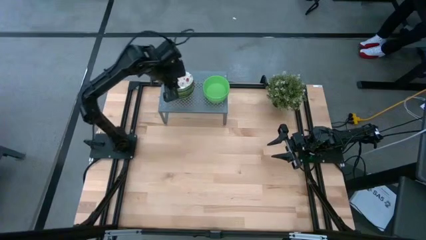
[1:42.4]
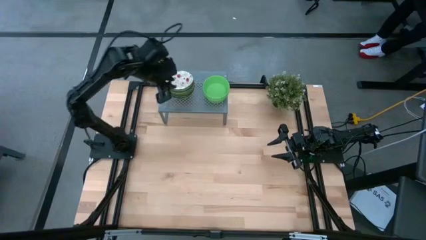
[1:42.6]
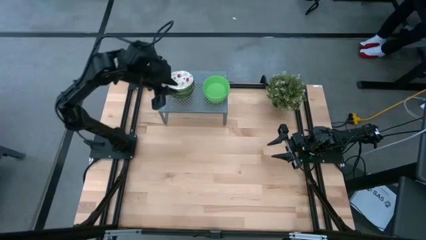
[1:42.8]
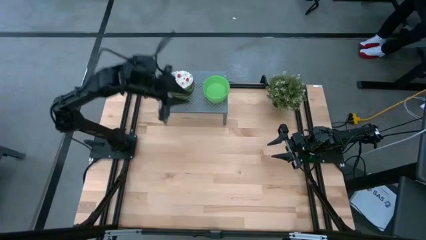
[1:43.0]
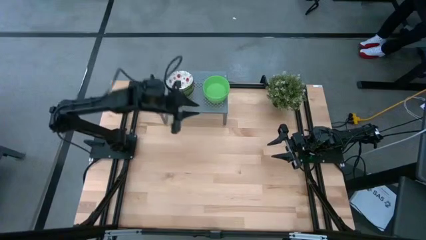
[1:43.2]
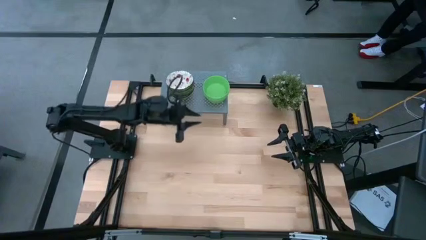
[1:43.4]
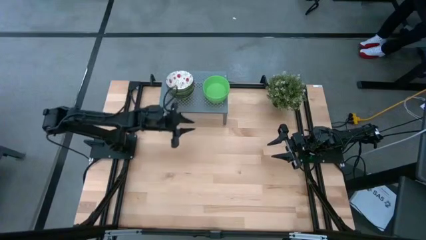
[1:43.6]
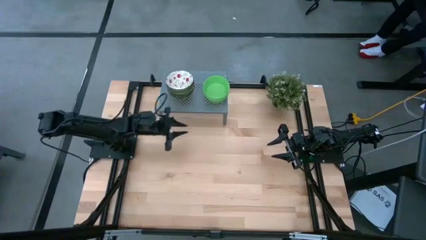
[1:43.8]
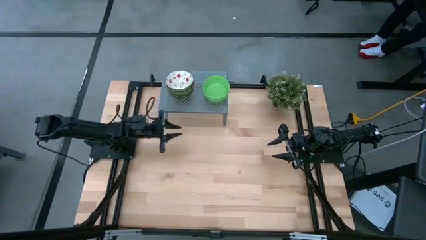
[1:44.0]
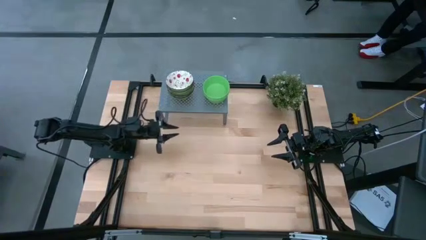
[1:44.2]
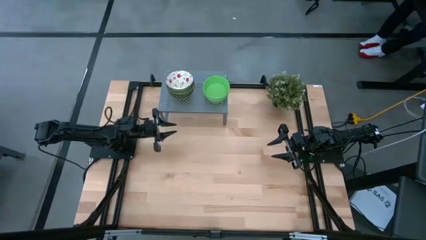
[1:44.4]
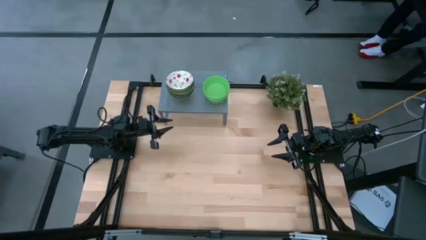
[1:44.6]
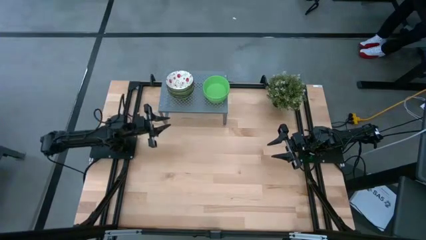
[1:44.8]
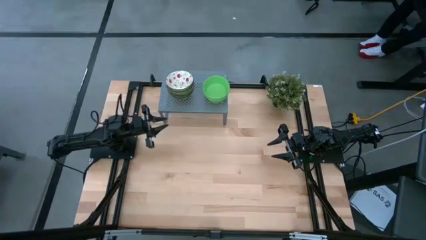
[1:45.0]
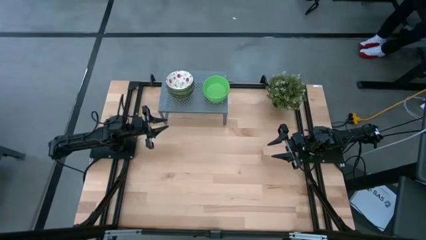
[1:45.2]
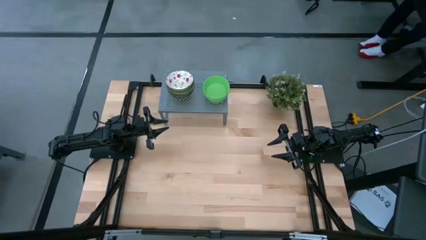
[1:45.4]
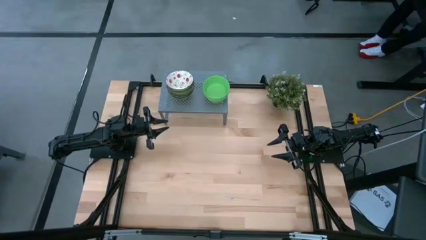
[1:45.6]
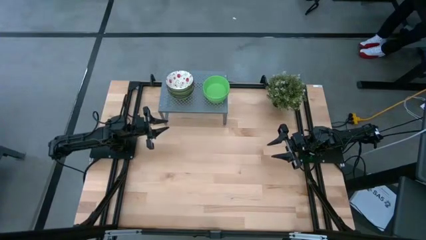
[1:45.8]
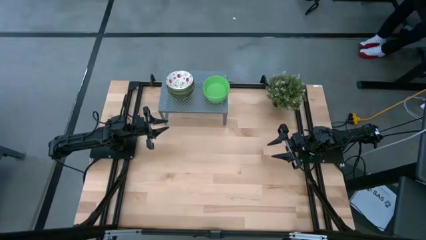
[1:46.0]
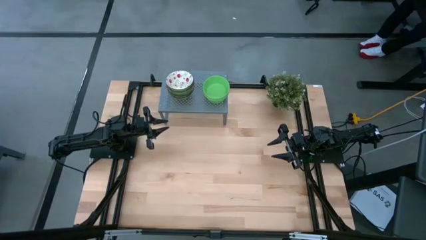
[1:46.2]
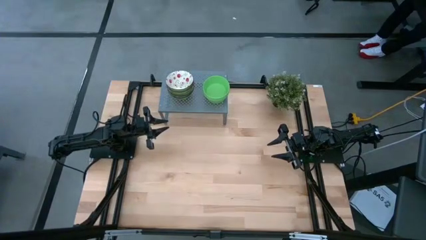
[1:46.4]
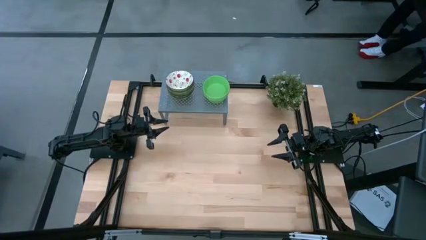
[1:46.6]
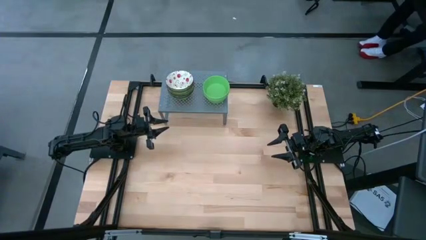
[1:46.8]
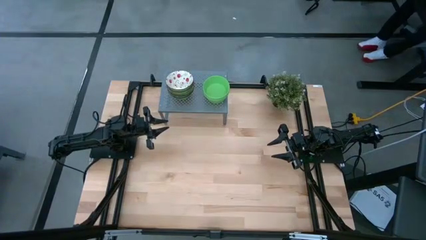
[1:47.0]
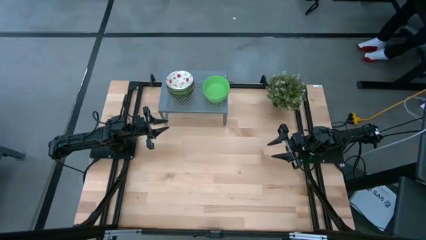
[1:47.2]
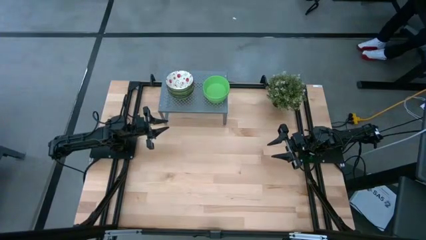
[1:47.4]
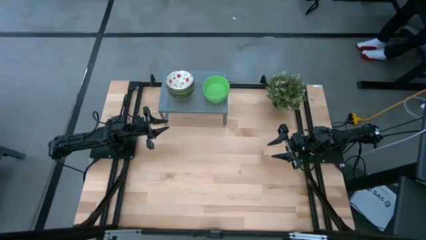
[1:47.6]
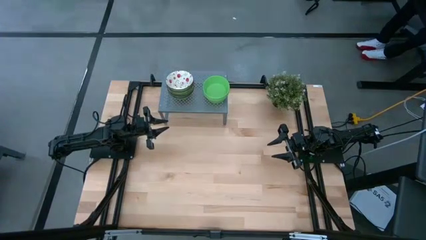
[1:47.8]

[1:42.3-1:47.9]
Task: Pick & Place Mini bowls
Return to Home Position

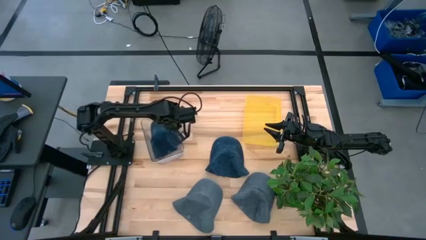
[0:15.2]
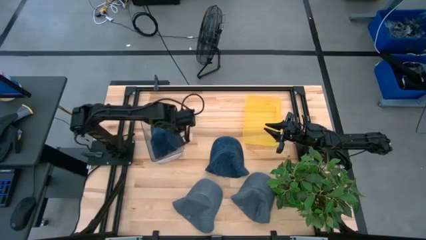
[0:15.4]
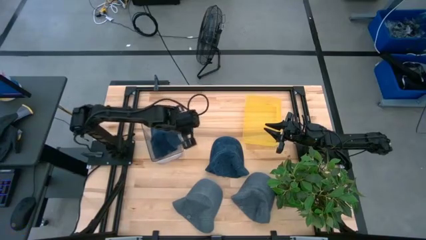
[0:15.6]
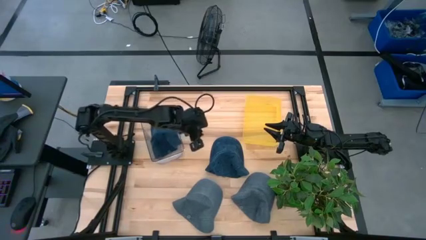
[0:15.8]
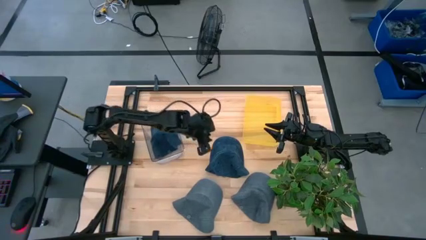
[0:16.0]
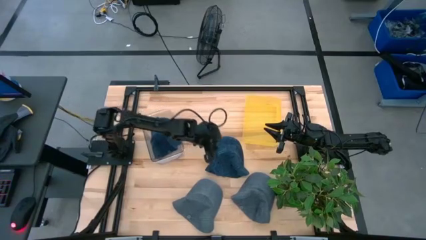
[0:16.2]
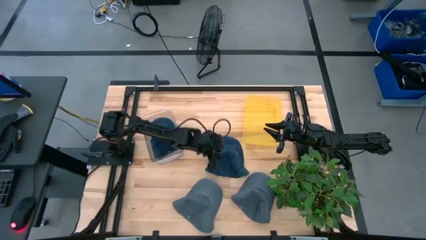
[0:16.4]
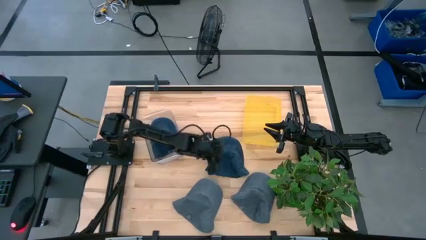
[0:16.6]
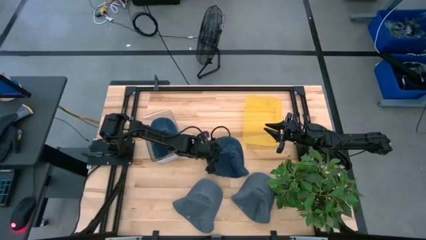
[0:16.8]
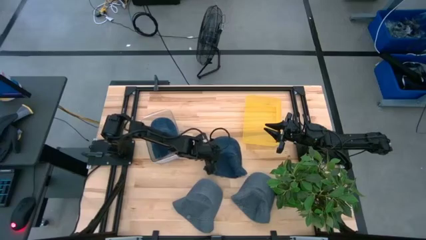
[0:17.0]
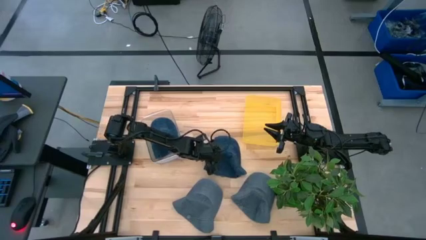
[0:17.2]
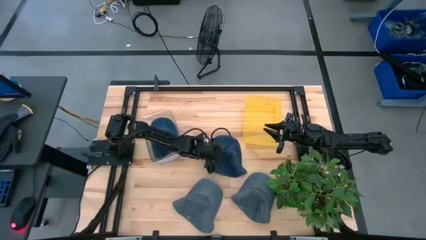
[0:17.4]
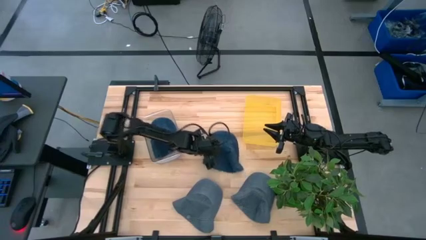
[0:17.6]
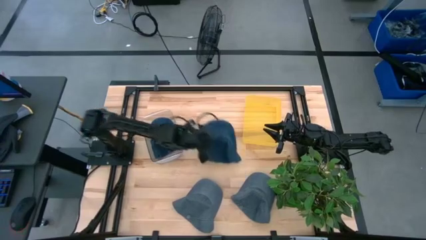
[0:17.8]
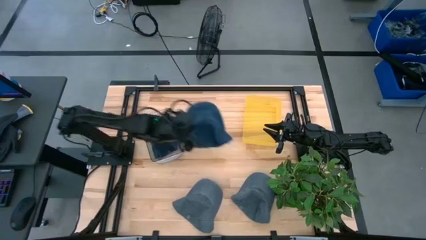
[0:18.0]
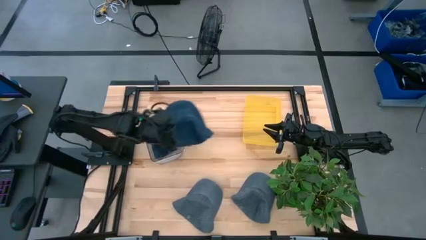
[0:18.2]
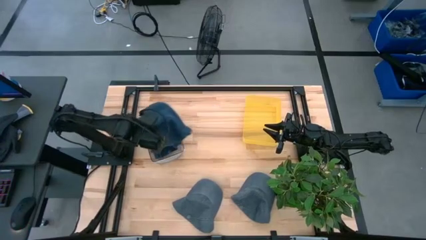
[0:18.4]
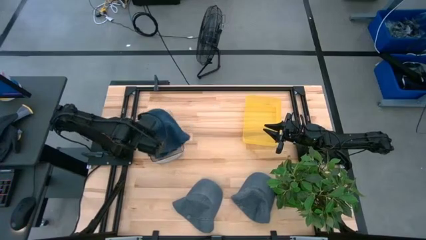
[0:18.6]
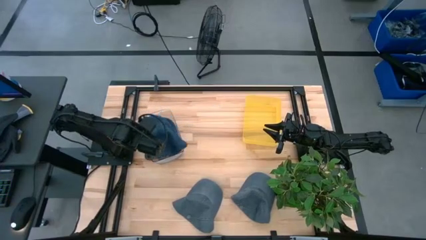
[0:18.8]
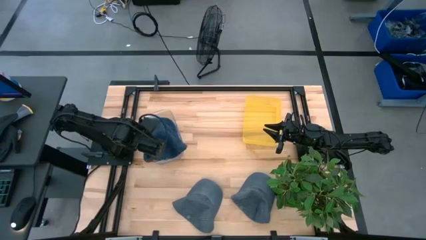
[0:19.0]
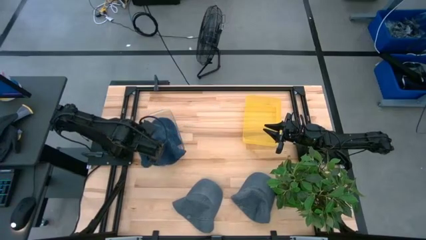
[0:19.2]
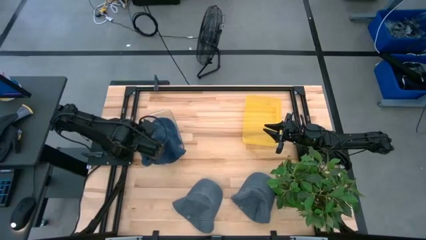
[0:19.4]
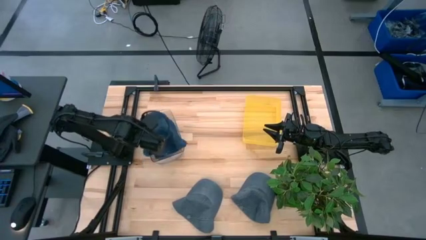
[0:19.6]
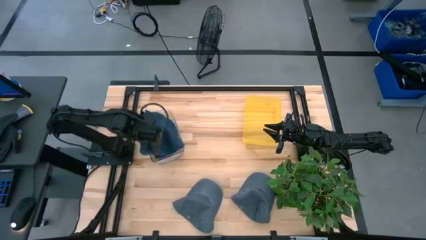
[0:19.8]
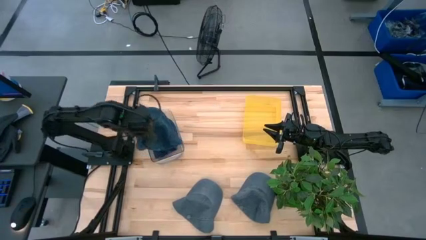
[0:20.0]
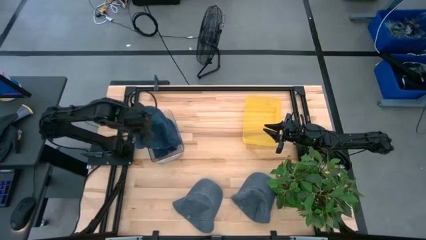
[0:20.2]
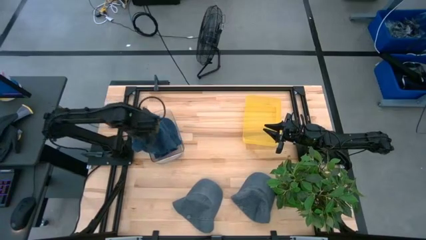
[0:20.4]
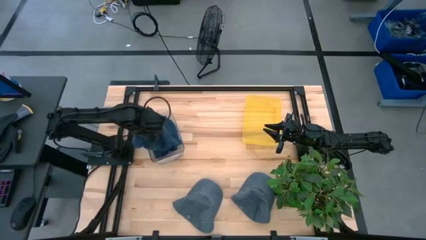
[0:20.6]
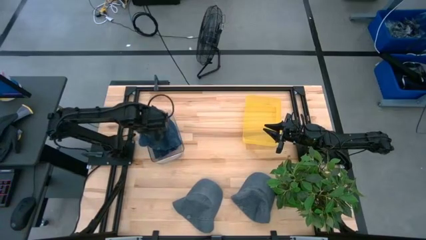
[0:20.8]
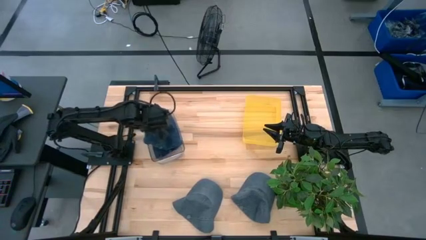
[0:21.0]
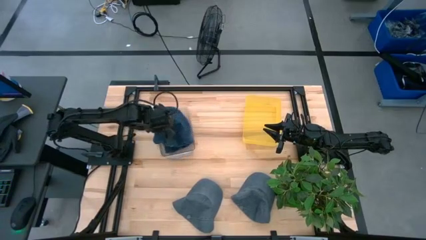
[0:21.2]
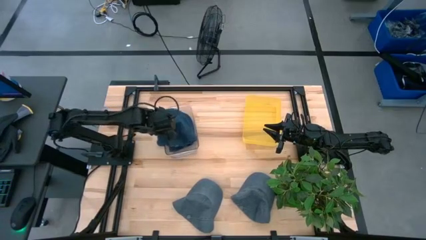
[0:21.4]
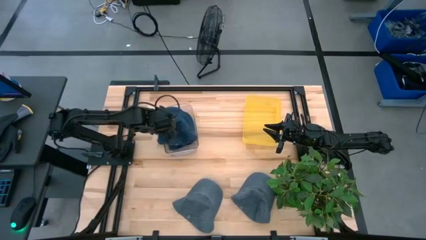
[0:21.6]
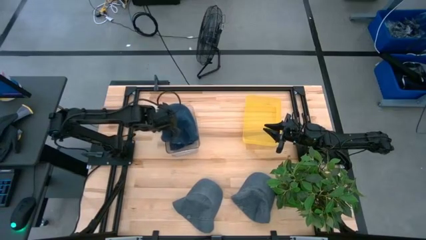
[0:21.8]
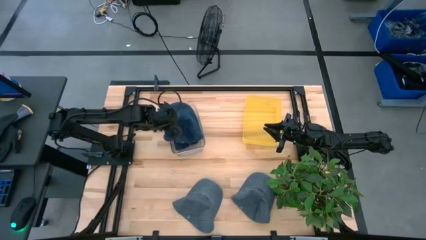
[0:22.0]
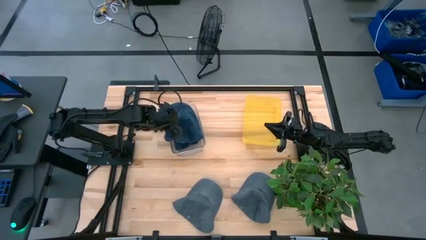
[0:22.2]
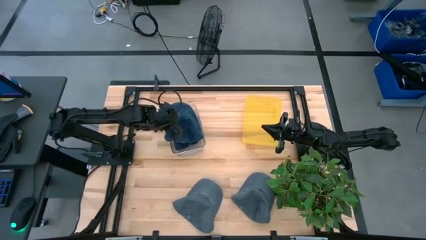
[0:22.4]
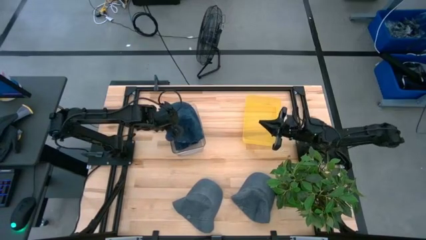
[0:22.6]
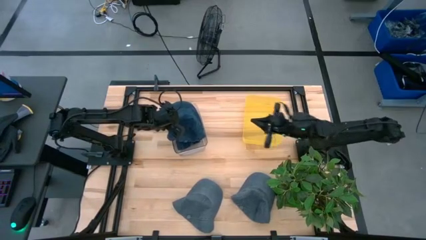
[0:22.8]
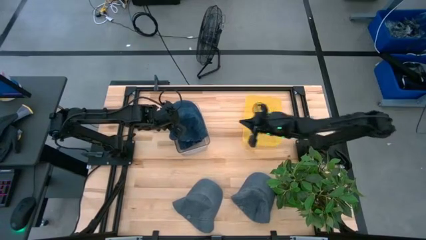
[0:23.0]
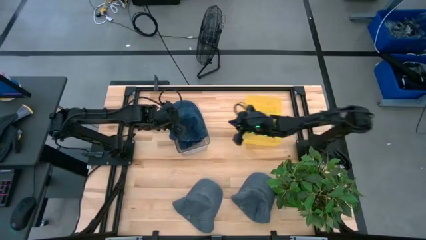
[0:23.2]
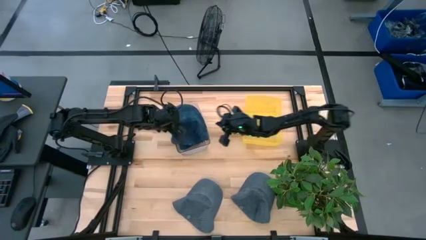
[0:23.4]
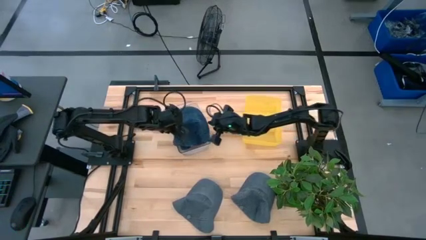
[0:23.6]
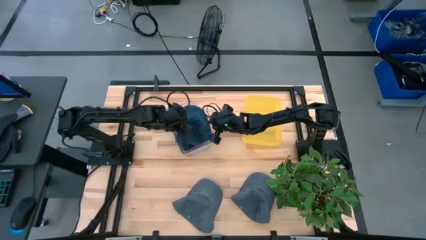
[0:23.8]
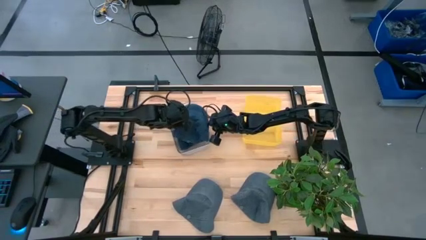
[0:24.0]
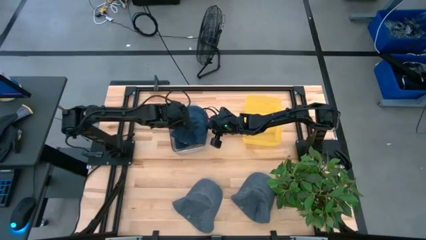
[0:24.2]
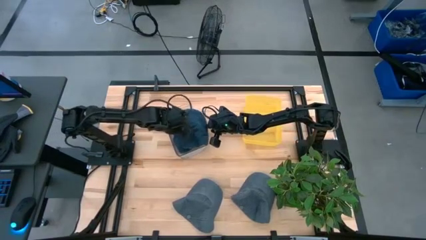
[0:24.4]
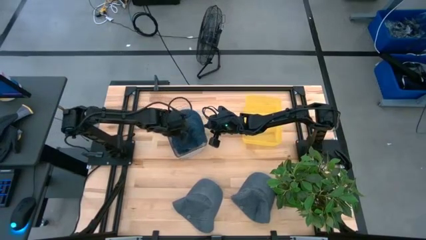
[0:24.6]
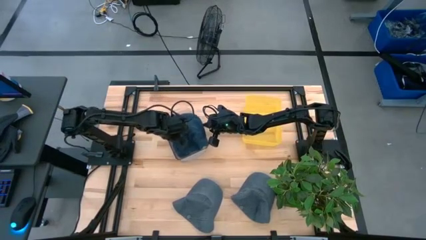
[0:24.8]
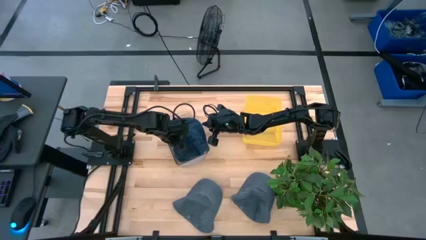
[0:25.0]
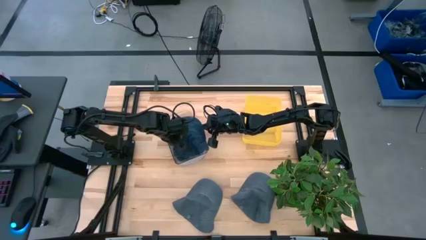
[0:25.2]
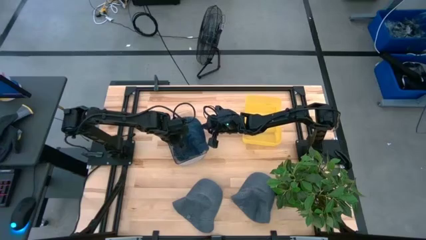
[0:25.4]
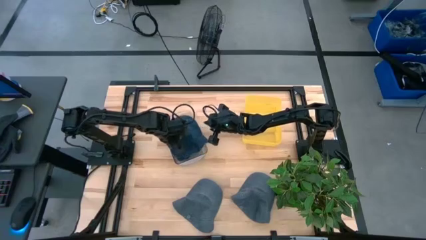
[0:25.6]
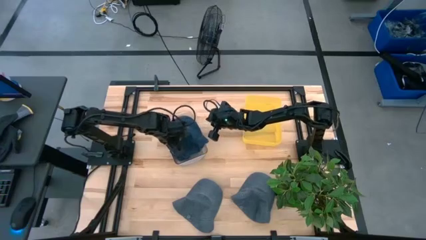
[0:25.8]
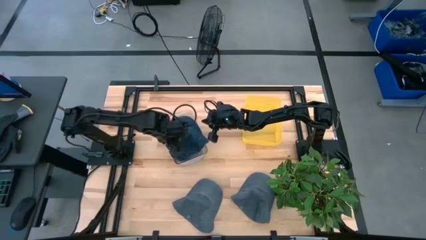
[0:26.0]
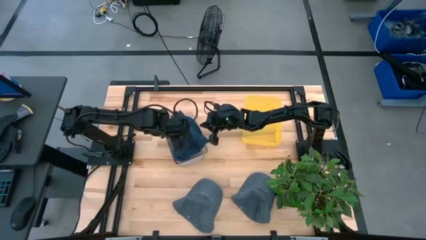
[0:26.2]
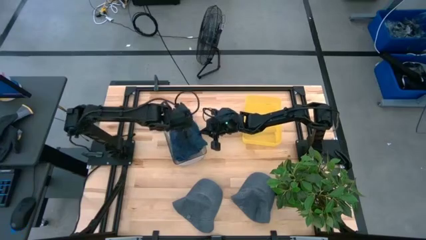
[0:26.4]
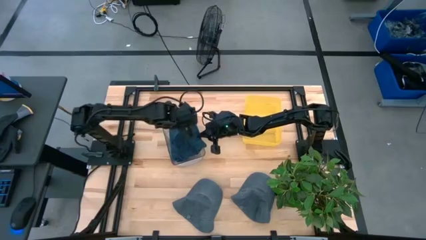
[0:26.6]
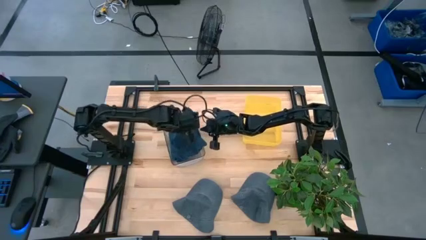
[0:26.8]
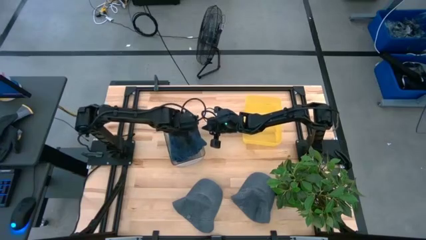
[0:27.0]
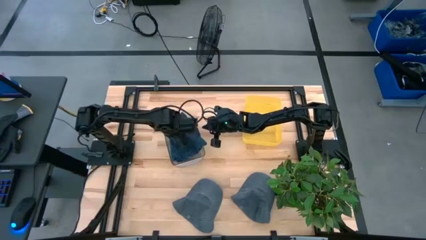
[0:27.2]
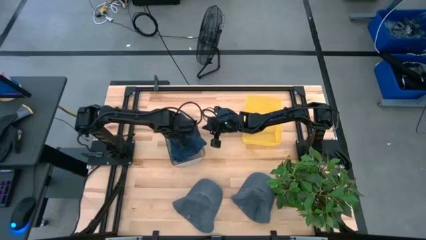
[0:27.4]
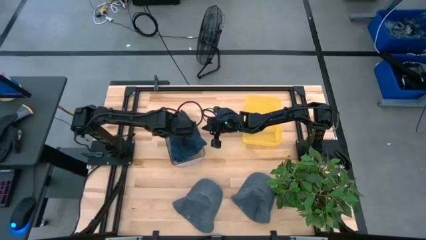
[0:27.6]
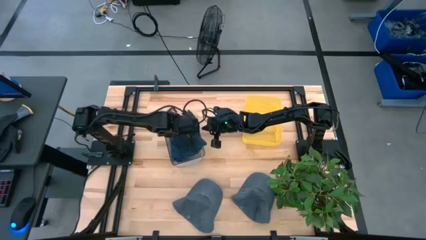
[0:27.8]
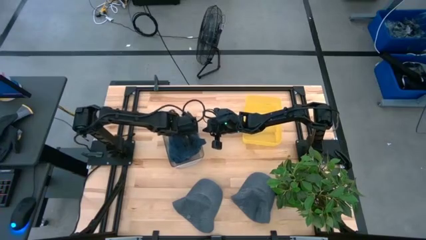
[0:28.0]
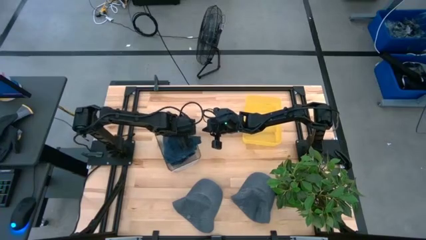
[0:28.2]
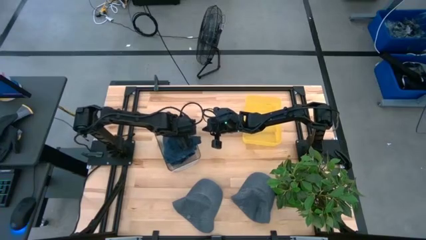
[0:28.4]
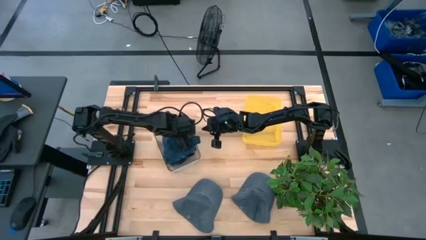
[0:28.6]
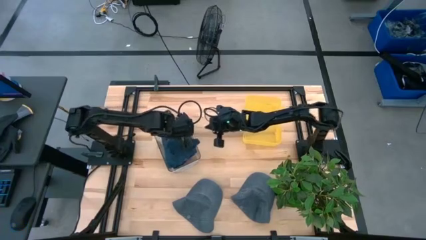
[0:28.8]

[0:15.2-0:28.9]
Task: Pick & Place hat
Put the blue cap into the transparent bin
